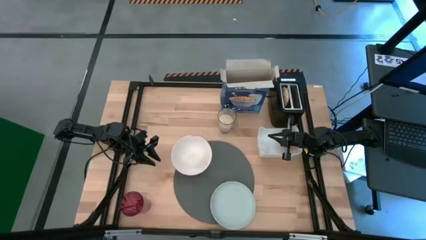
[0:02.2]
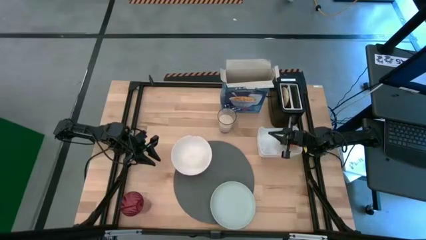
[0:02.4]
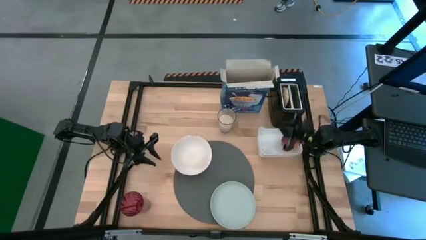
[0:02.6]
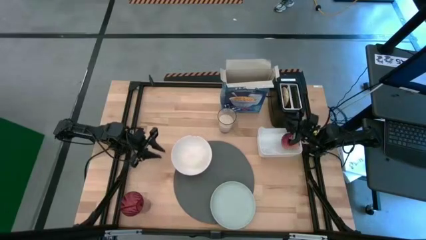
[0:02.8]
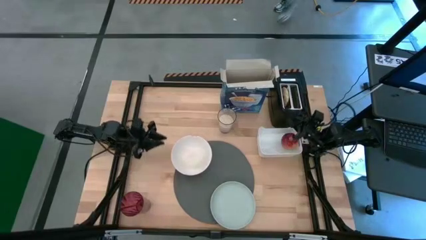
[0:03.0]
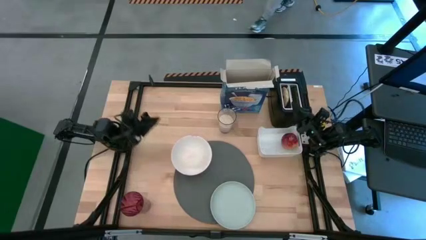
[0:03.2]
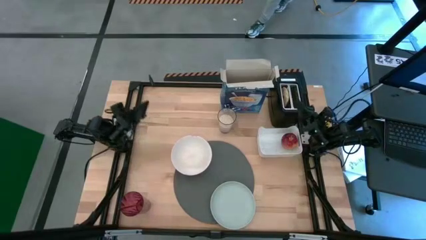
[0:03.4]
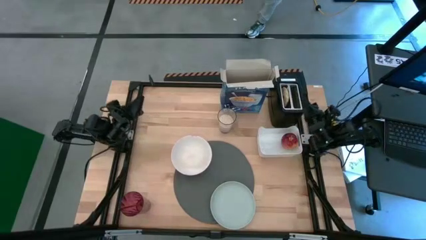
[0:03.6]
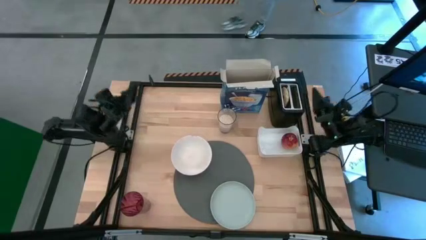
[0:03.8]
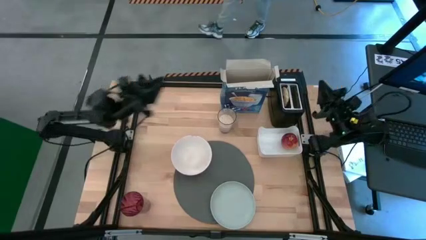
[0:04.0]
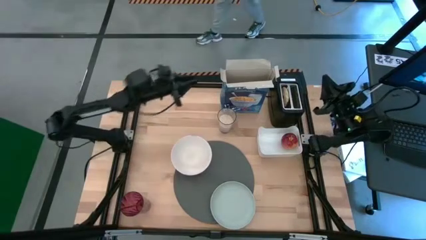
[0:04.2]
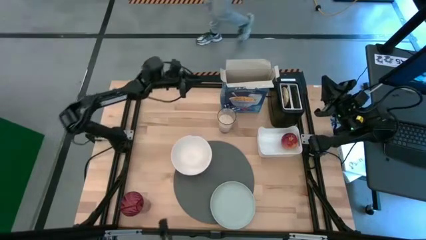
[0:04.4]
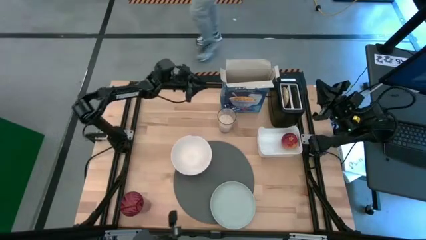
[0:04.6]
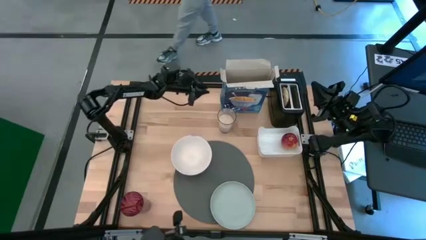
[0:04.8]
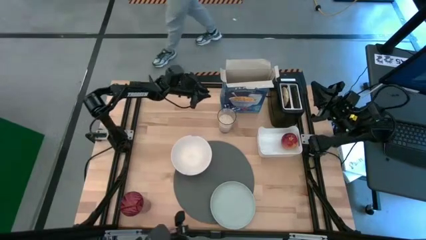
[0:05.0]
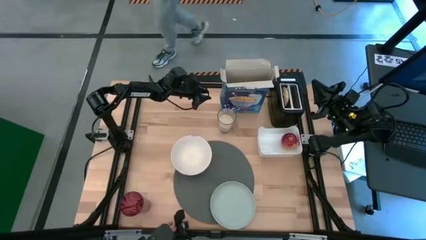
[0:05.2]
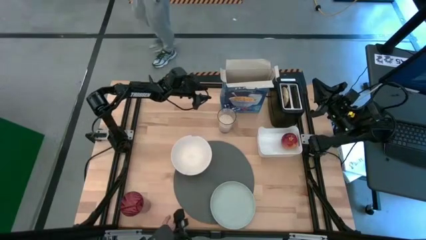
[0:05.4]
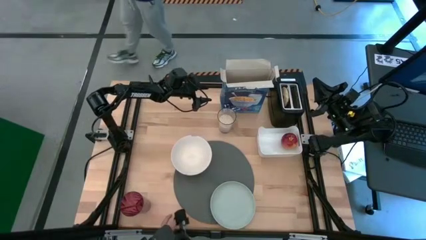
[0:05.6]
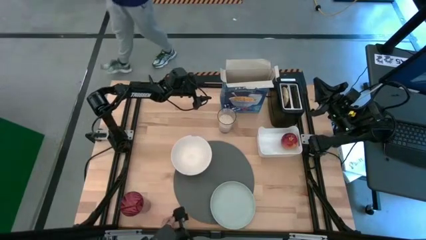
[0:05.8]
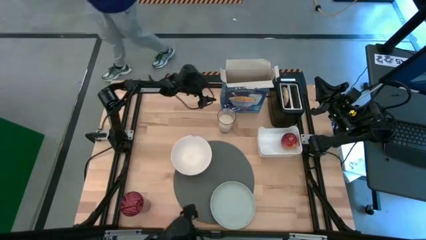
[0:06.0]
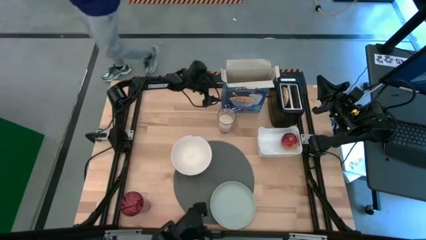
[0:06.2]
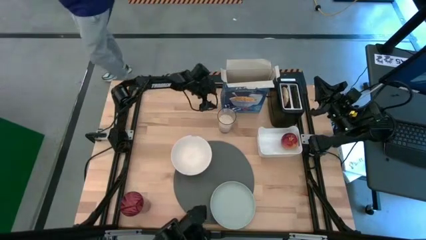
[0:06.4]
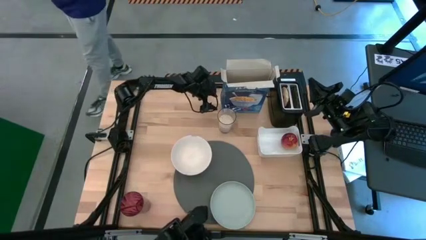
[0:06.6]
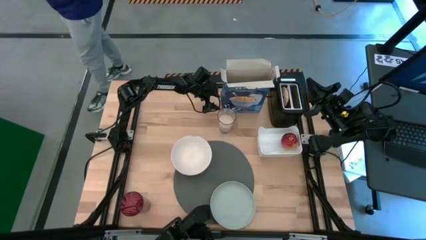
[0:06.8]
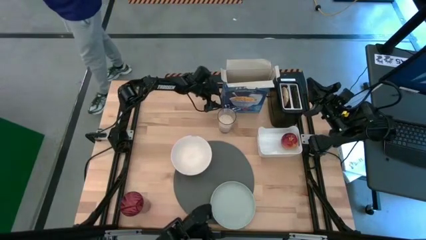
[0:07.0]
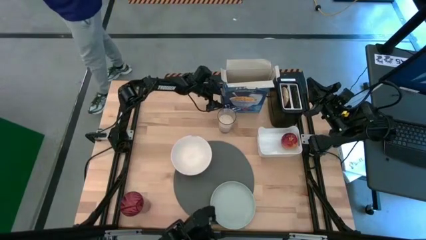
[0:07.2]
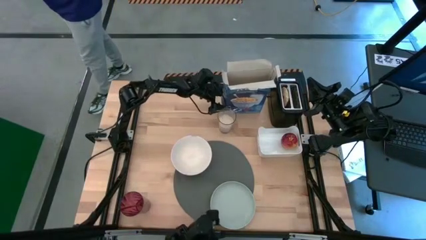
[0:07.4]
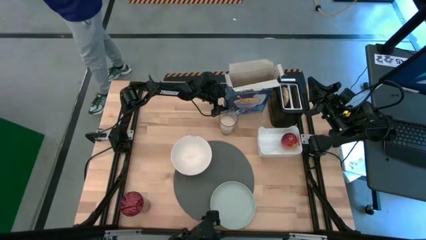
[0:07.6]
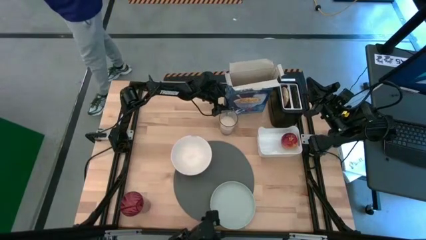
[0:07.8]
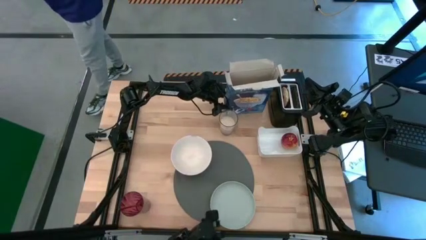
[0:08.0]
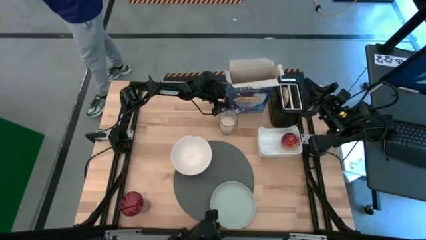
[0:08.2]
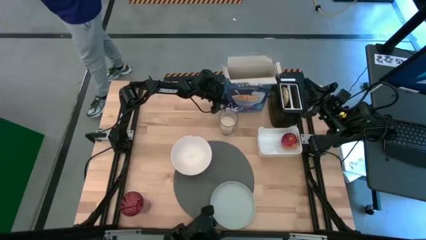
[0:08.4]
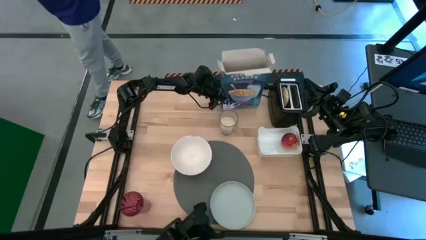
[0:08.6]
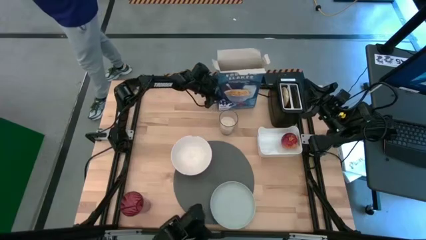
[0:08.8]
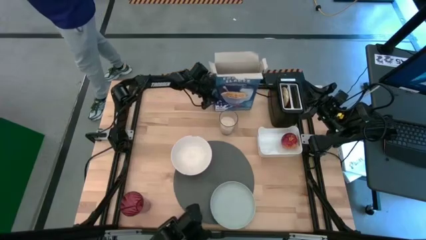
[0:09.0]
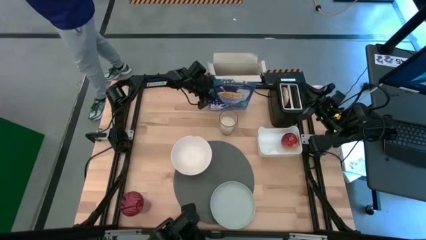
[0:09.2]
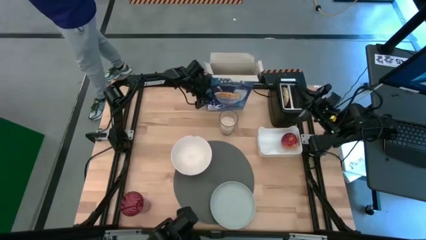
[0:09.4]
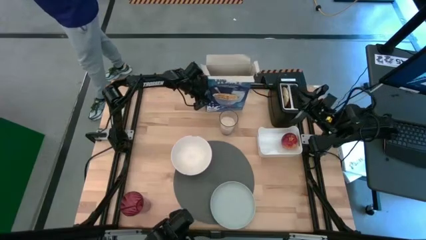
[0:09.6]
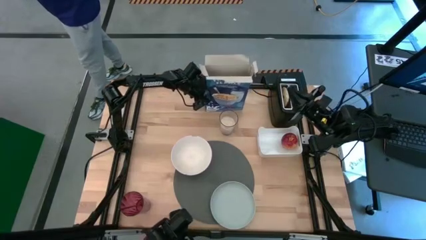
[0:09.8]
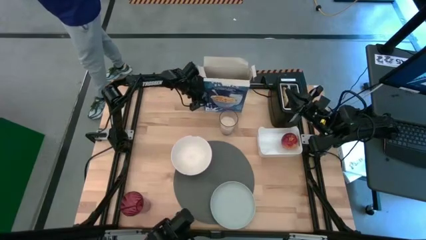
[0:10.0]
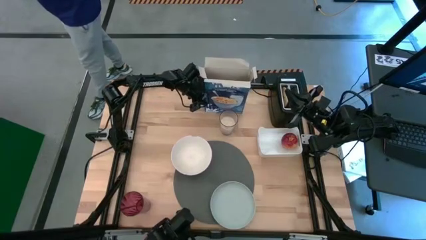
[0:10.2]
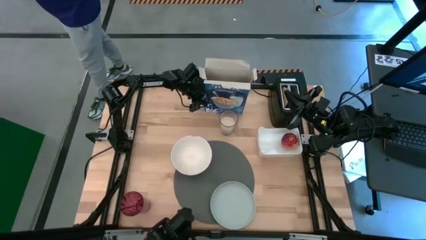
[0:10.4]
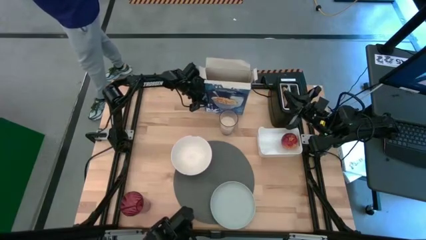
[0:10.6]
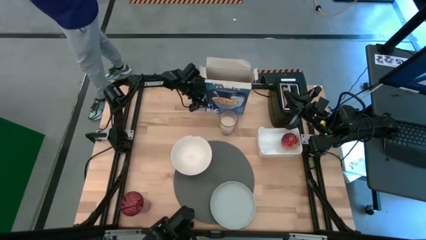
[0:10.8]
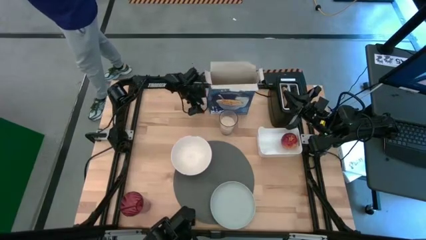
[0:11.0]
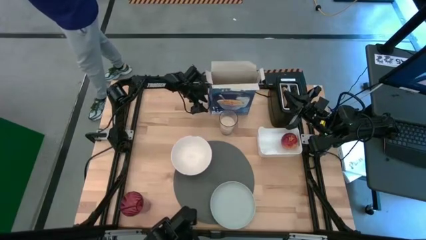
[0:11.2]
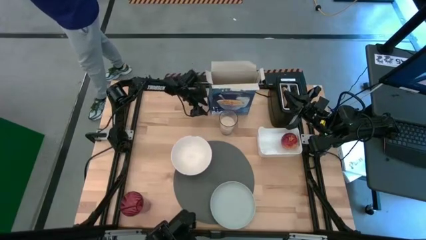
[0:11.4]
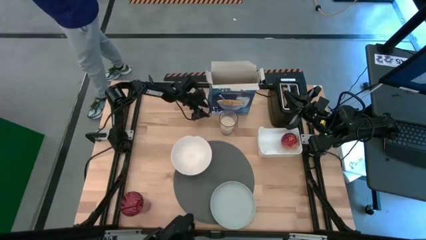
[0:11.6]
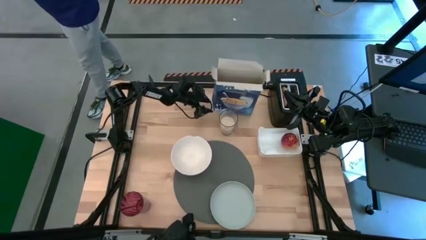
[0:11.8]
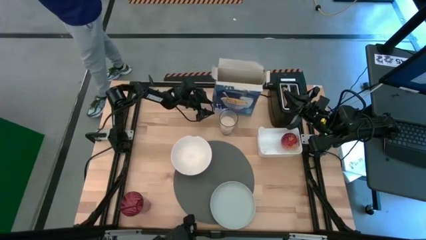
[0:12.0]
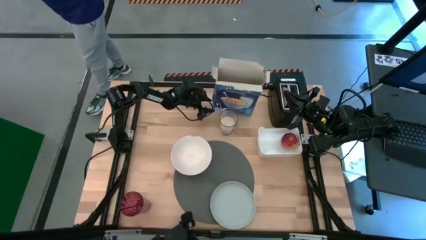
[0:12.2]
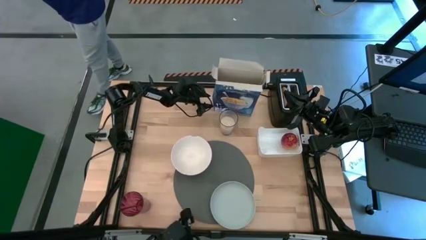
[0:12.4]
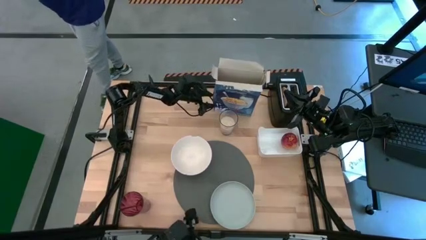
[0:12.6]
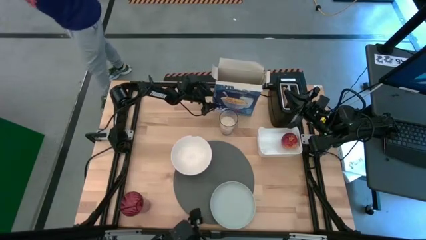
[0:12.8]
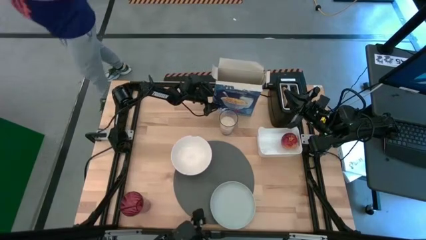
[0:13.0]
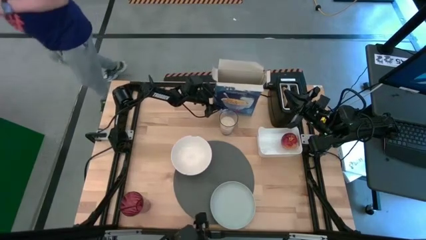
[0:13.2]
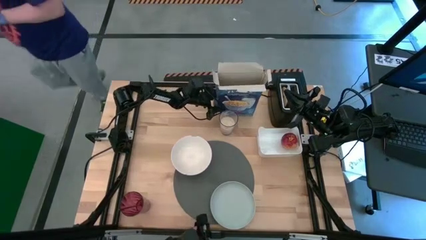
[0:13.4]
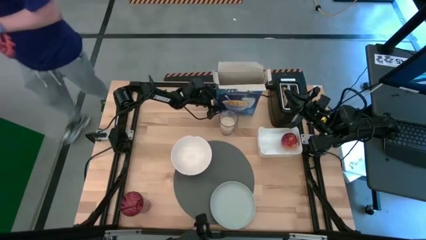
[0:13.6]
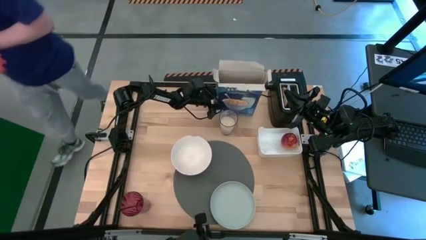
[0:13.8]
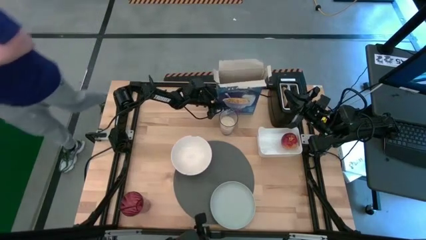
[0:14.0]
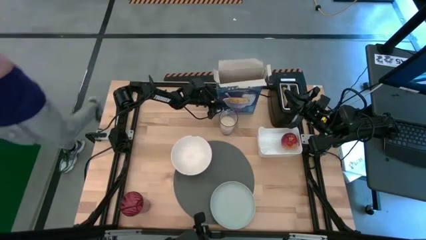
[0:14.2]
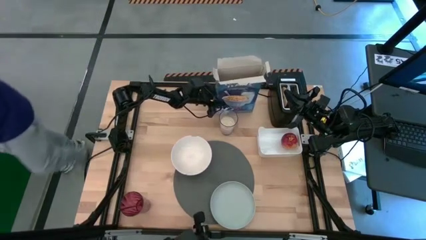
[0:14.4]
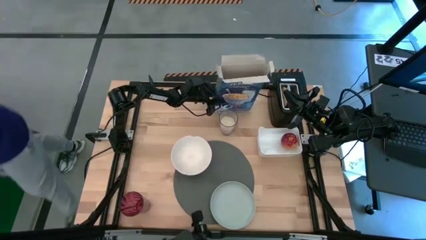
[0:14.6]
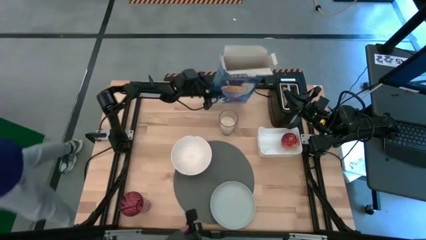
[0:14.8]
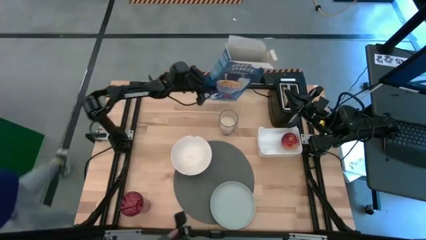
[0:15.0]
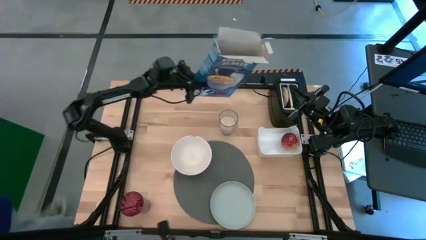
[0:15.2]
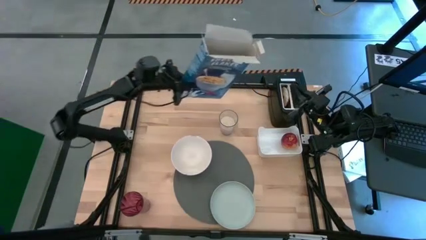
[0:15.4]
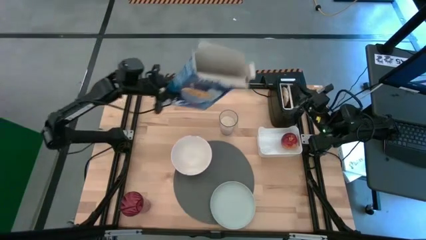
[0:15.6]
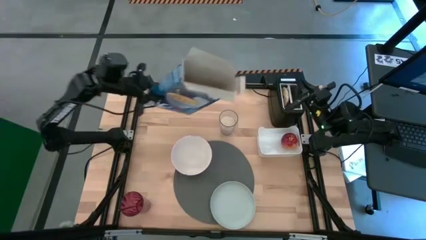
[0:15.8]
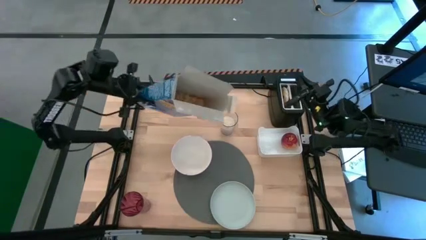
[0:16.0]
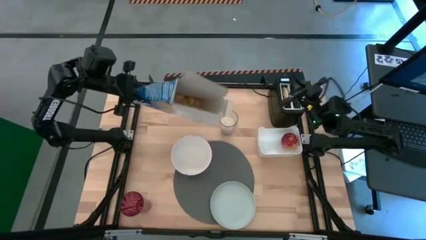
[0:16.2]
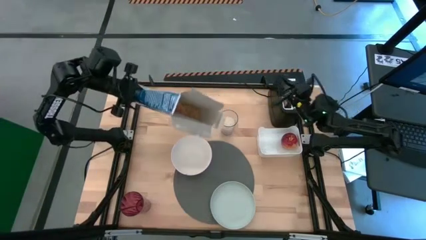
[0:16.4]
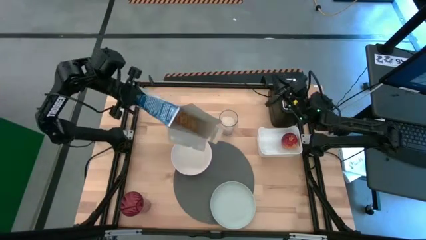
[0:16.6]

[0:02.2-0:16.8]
Task: Arrange a breakfast setting
Pour the cereal into the white bowl
